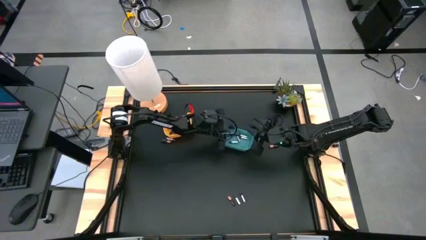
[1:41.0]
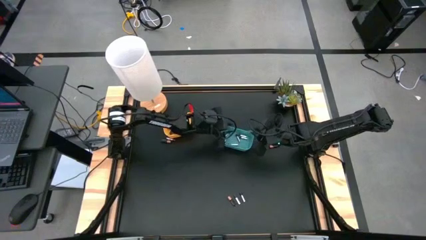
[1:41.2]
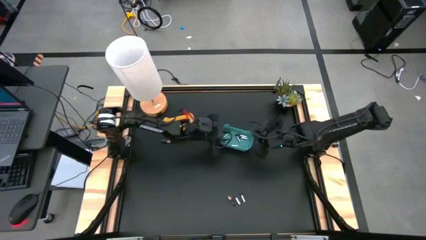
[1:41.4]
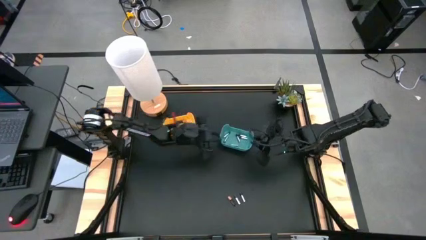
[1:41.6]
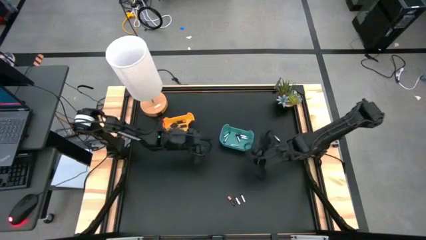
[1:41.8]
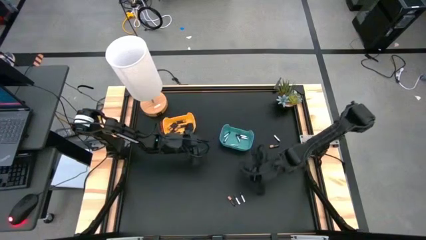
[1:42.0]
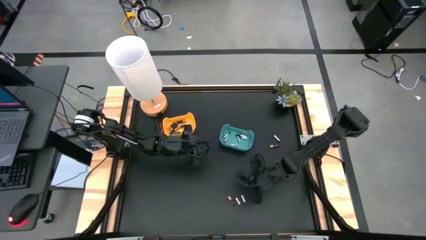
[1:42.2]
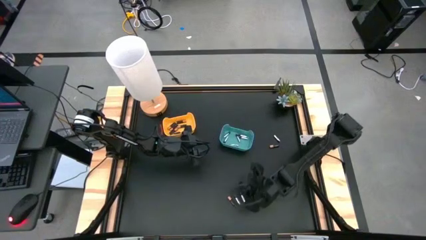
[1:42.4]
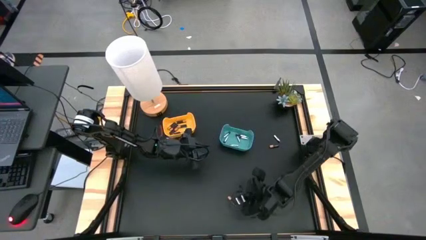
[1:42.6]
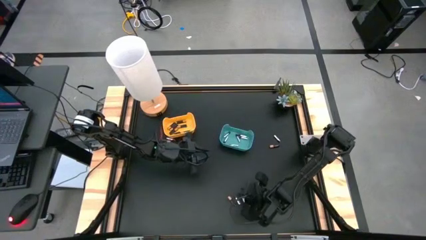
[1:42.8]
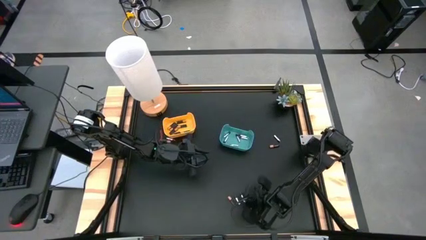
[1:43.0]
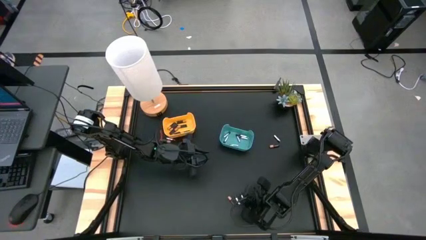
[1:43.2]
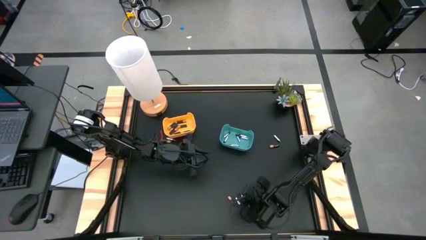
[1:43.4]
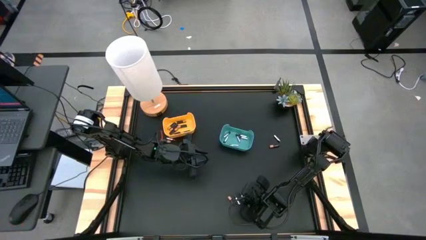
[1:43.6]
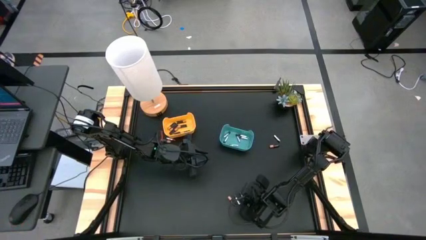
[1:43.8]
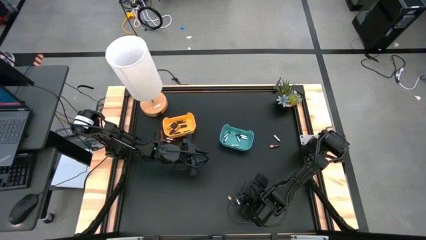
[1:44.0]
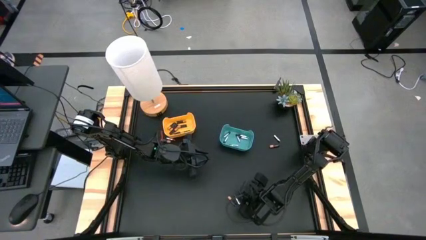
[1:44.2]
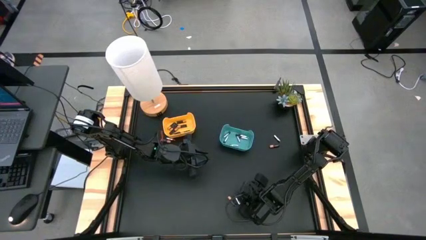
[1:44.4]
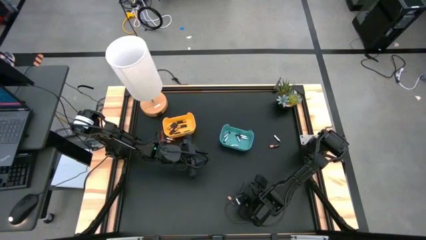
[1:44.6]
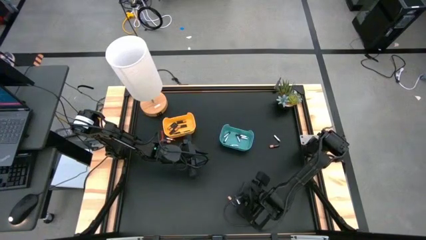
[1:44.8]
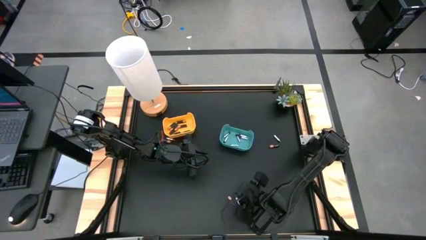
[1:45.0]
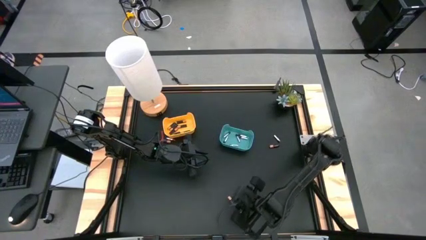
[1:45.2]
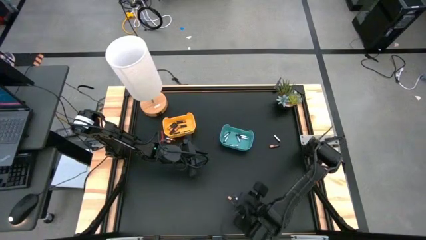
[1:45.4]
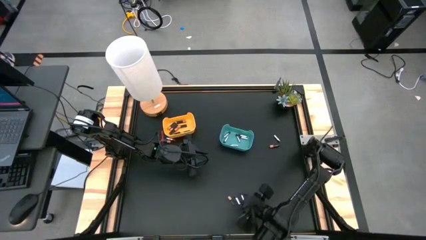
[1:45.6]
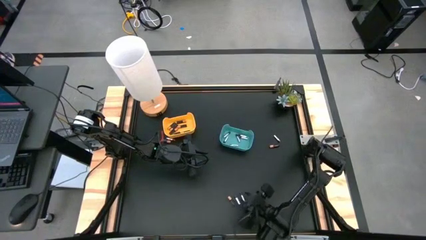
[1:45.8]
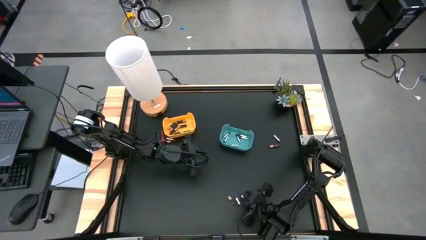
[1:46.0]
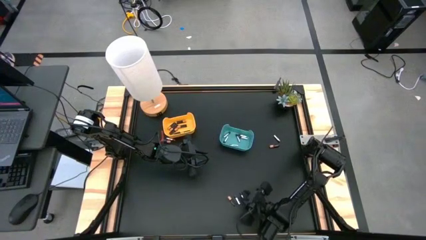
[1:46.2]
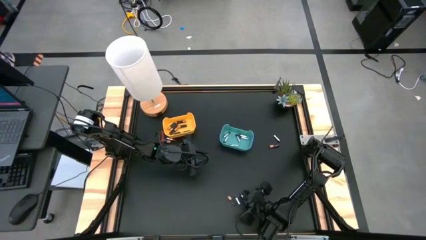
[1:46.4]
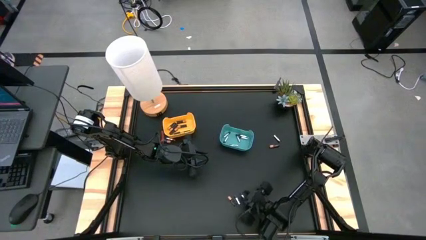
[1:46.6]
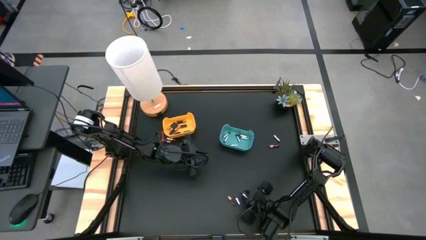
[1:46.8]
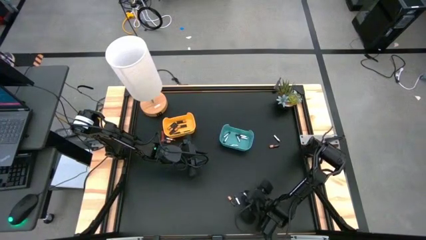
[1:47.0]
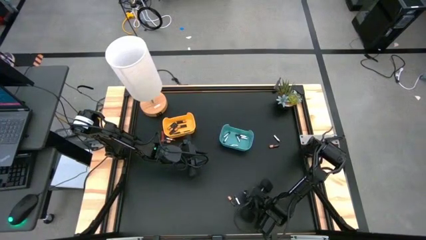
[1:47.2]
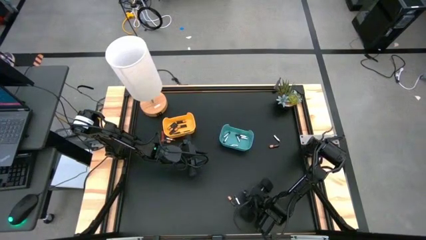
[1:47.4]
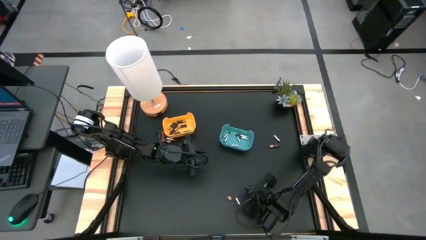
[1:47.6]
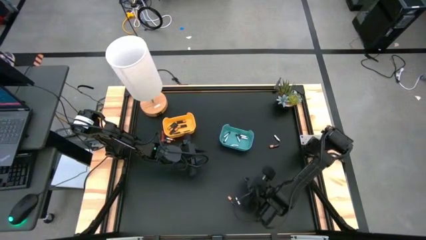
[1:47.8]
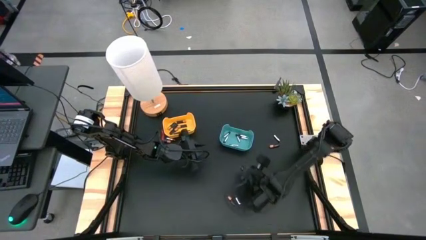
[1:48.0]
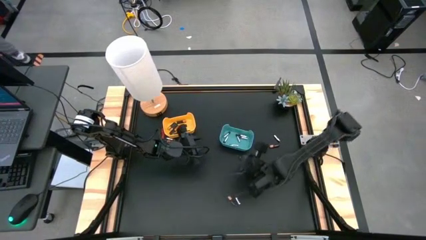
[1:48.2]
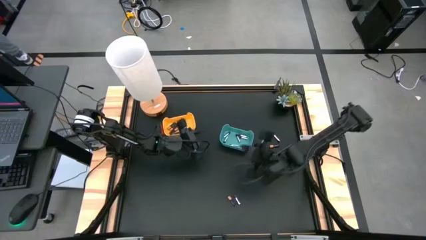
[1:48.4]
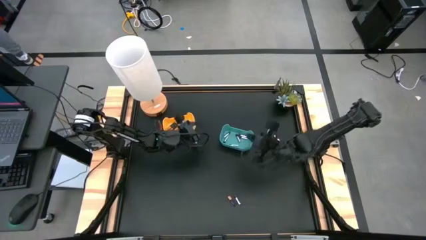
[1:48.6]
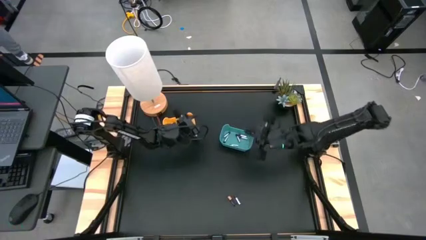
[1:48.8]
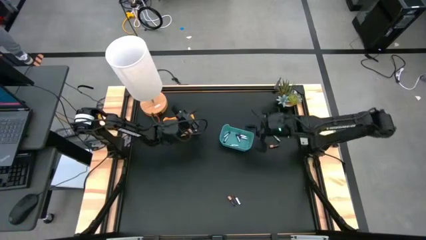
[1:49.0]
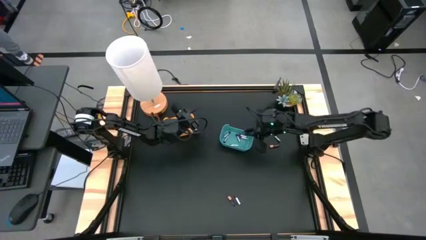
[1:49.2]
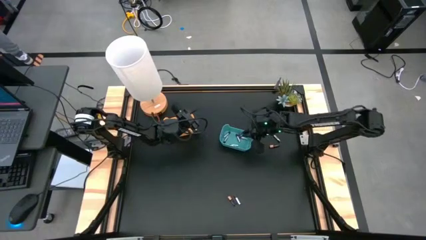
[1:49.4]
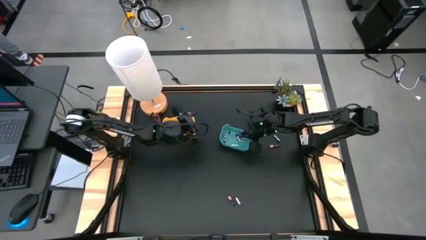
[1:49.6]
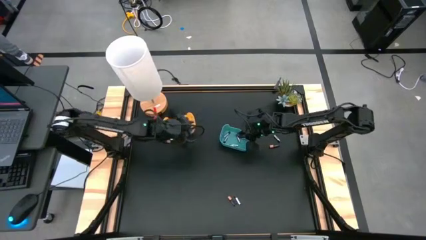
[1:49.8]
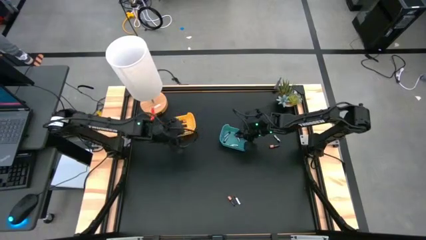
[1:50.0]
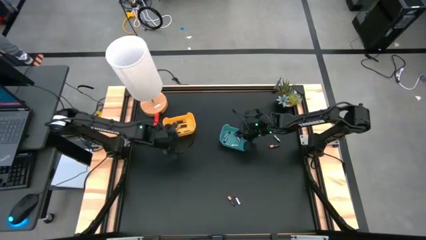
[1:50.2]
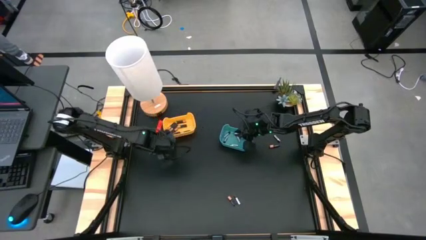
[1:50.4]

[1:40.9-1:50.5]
Task: Sort batteries
Put the silver battery into the blue bin

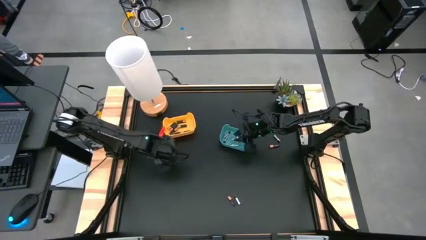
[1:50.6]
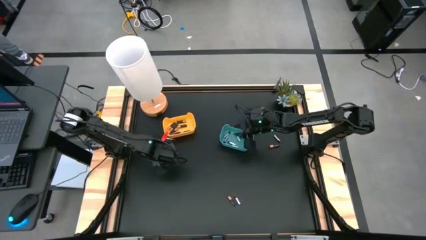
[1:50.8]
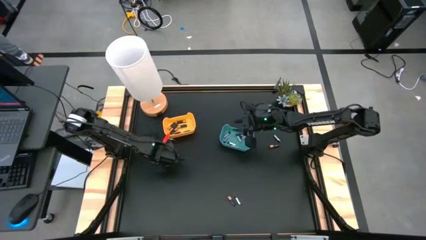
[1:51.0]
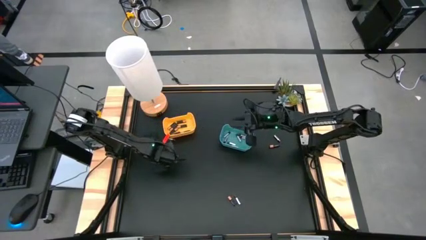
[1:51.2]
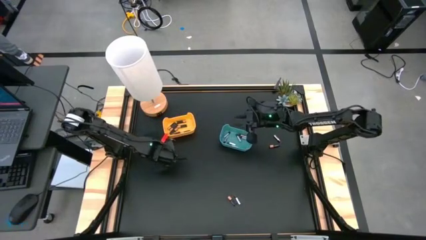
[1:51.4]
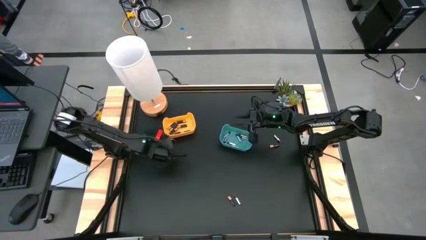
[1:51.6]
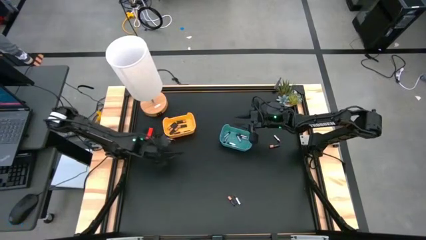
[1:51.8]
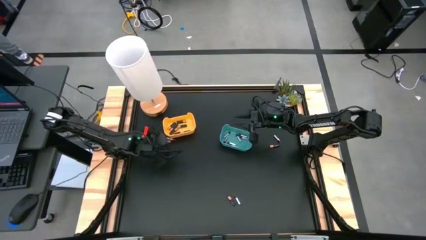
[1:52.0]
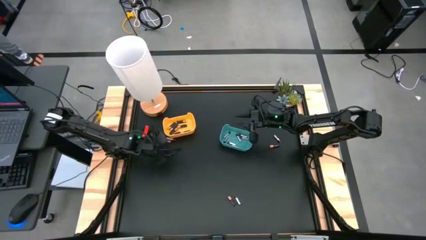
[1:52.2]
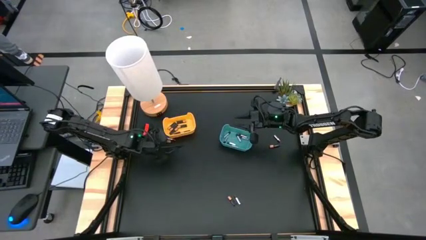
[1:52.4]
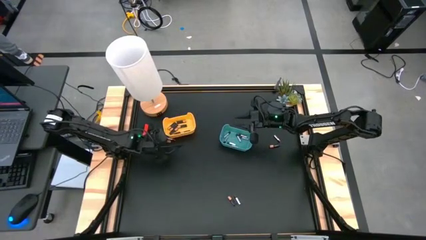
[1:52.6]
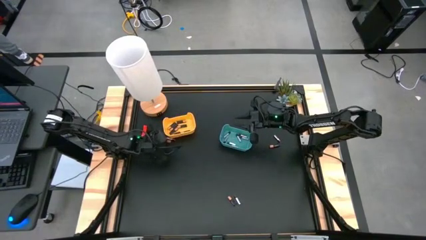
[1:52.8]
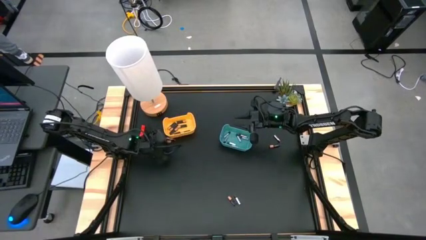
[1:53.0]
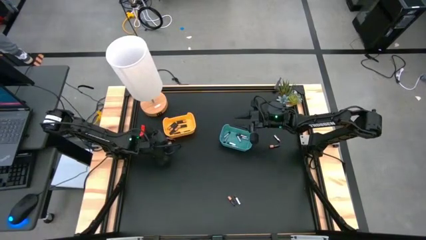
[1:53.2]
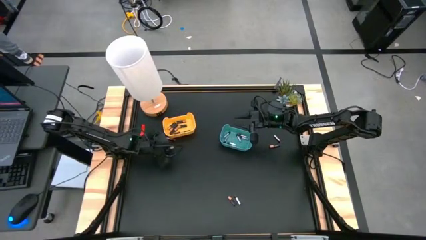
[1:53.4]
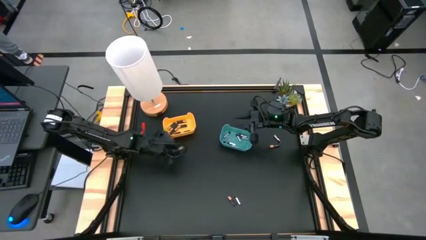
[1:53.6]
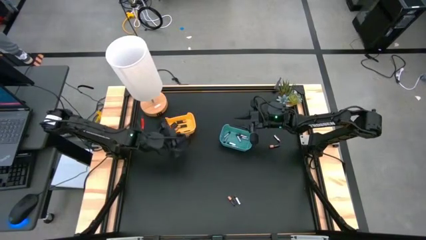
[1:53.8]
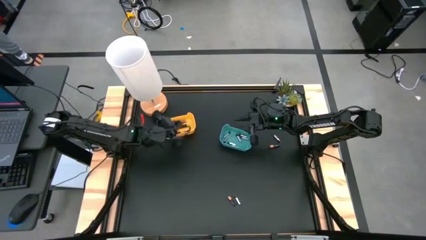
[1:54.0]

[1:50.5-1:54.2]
Put the top left black battery into the yellow bin

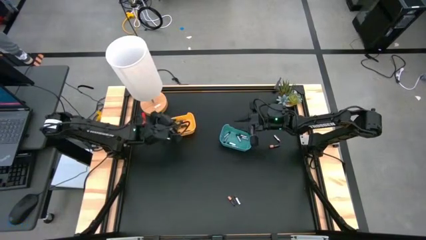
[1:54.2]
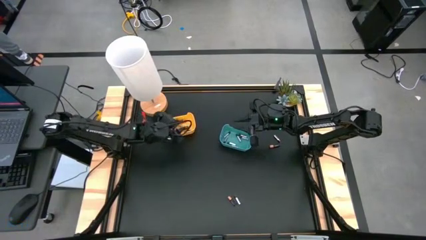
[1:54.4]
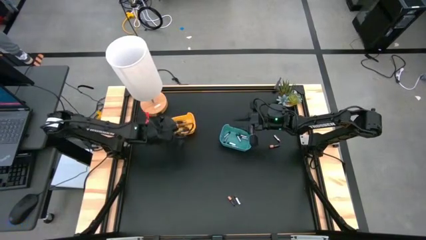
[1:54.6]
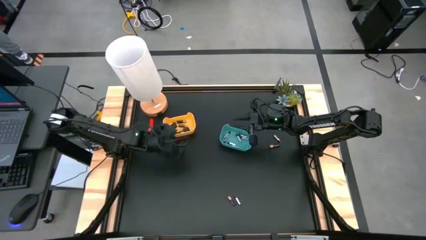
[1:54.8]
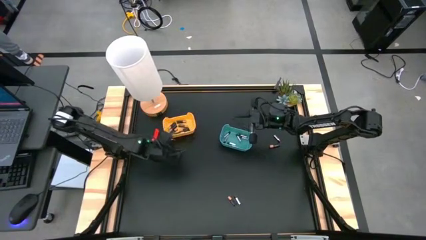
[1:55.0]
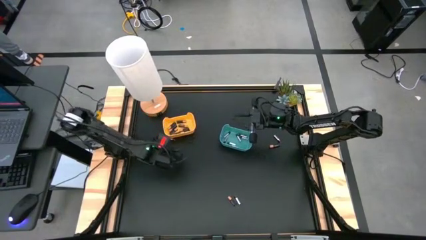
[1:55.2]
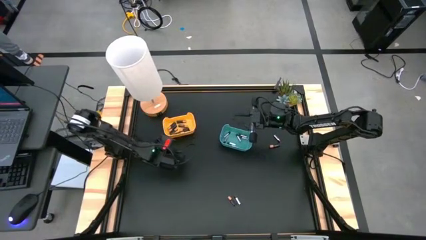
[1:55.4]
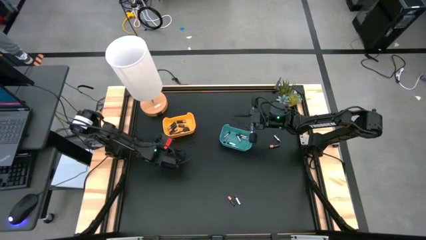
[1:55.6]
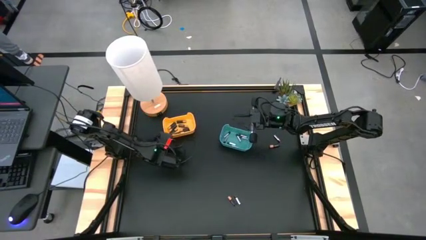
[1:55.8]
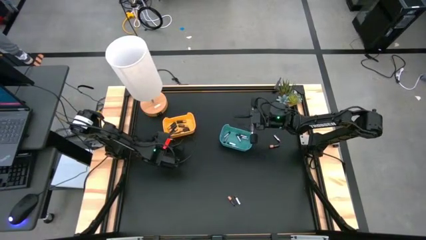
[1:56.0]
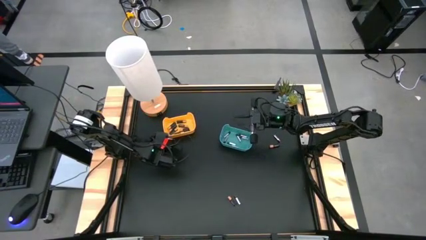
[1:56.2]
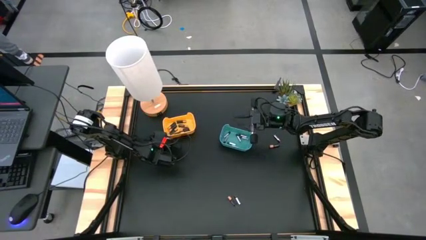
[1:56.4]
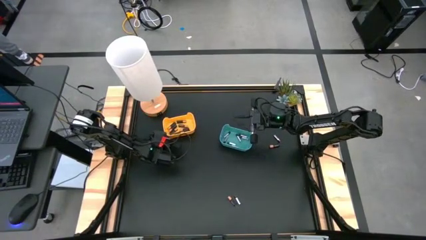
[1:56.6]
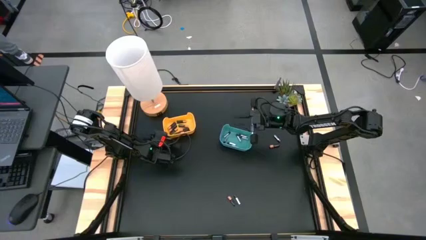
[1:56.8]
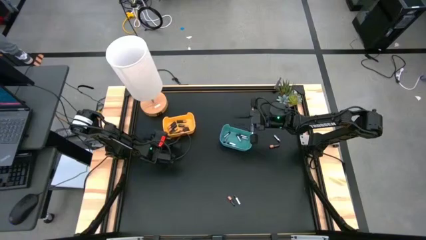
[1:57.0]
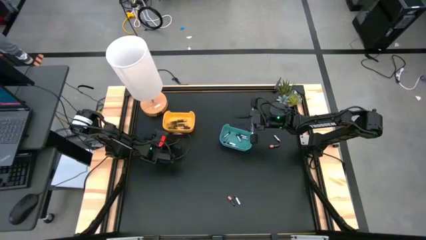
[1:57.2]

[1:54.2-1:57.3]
Put the top left silver battery into the blue bin
